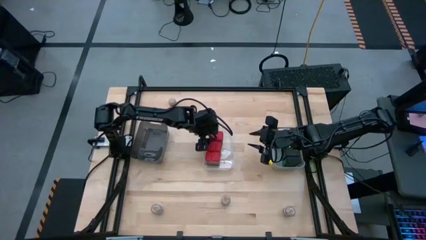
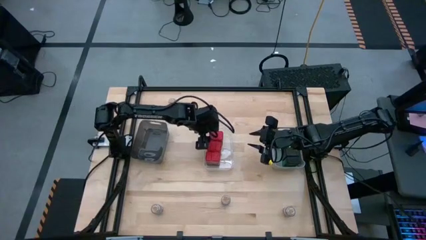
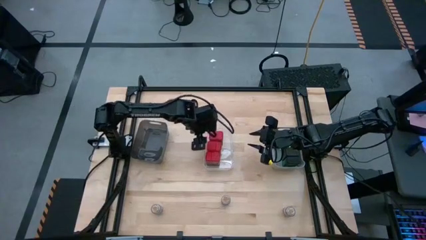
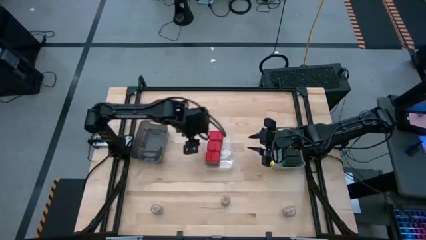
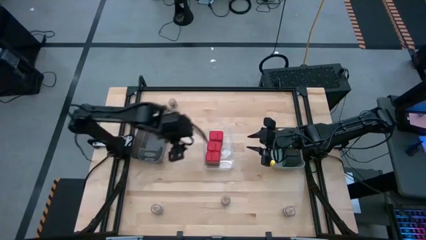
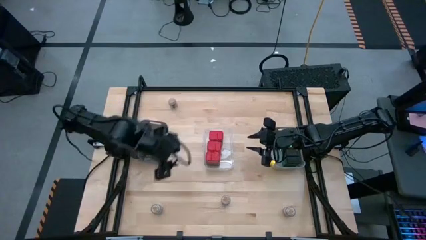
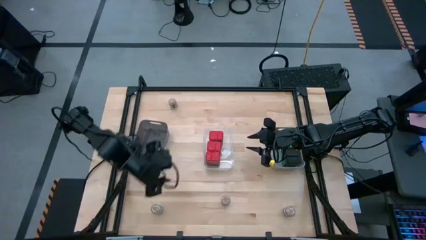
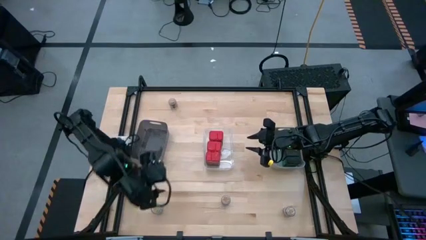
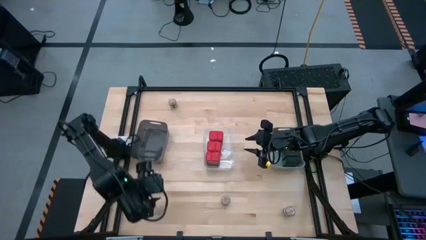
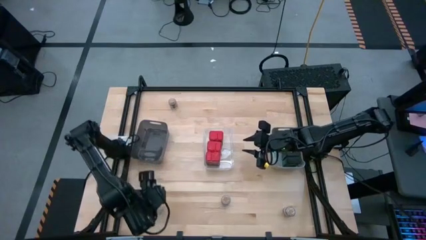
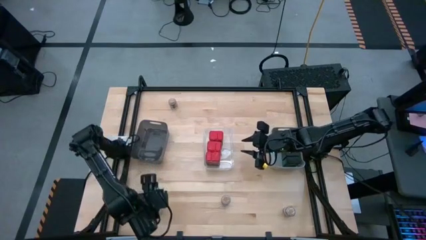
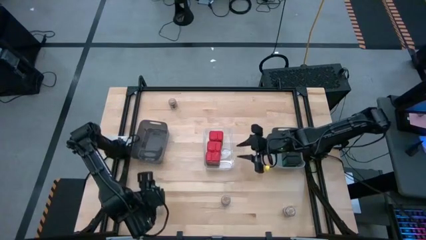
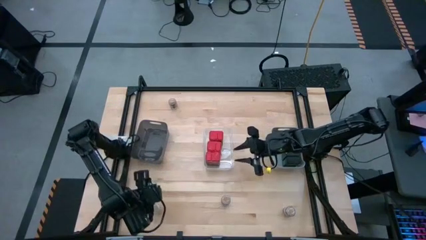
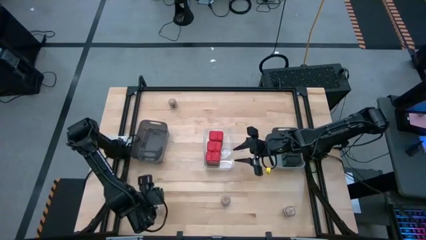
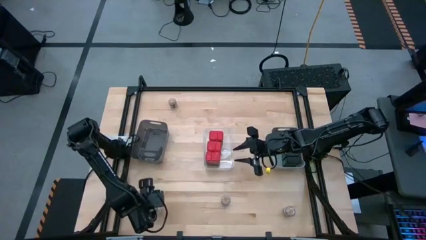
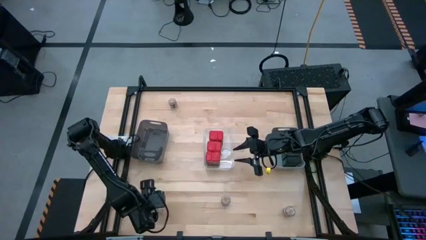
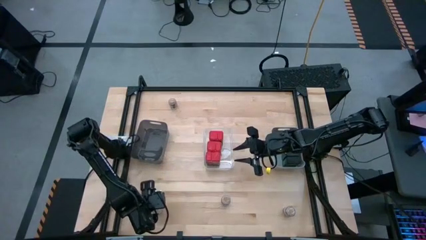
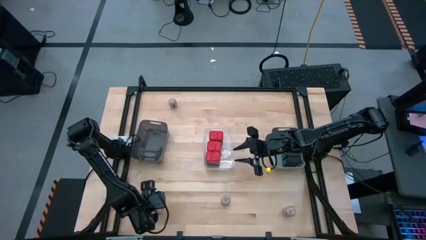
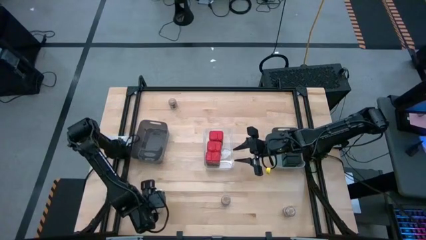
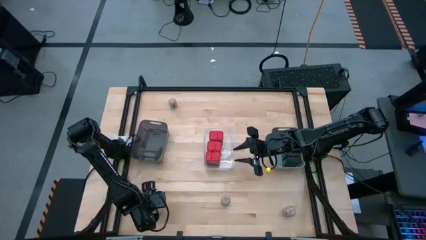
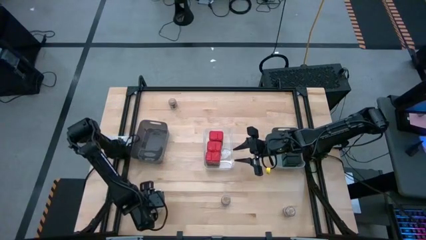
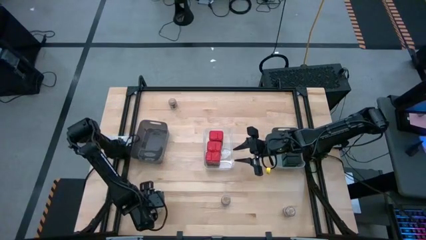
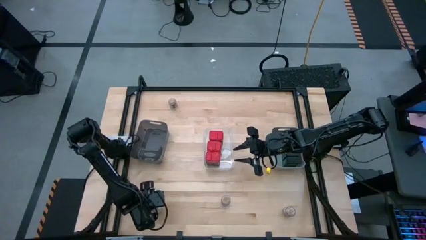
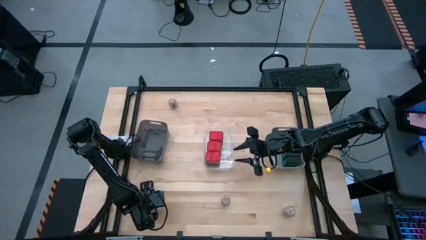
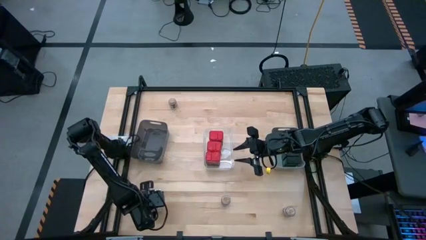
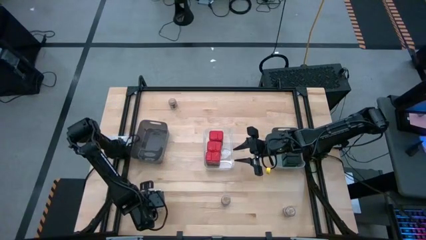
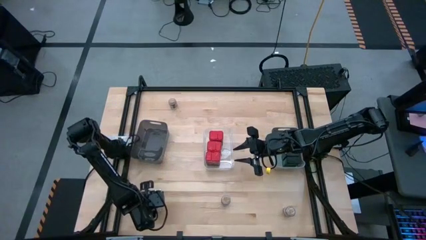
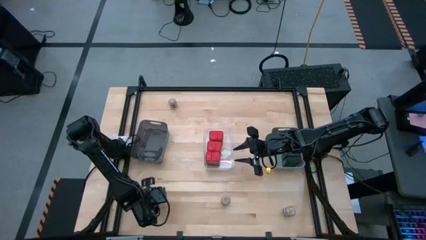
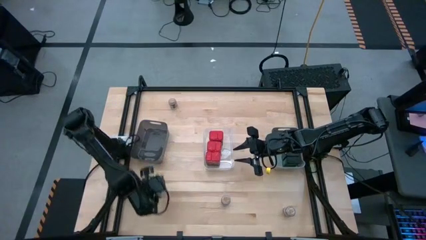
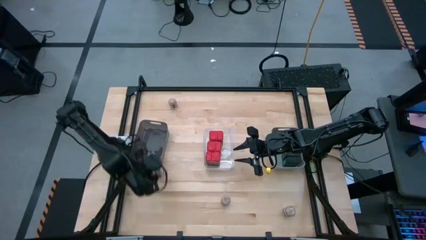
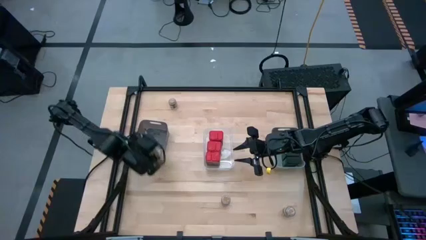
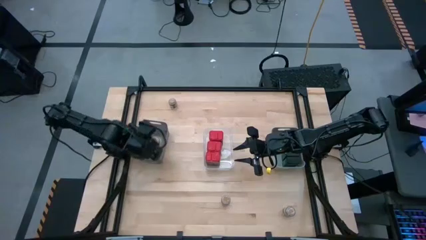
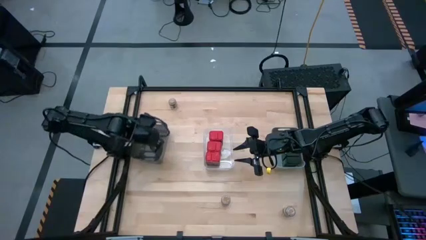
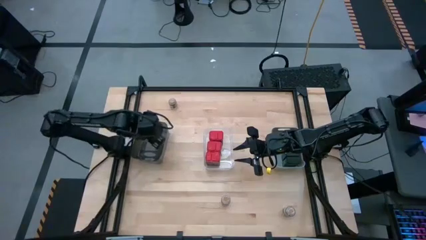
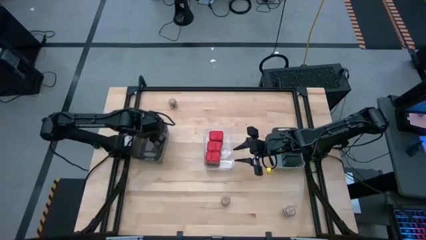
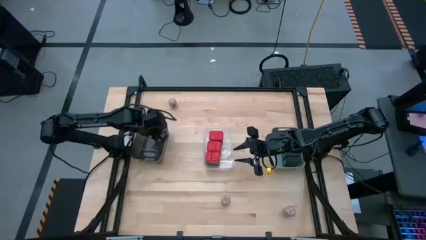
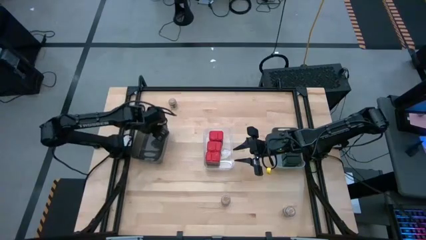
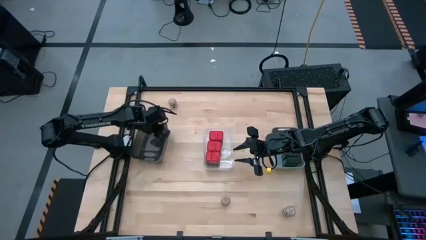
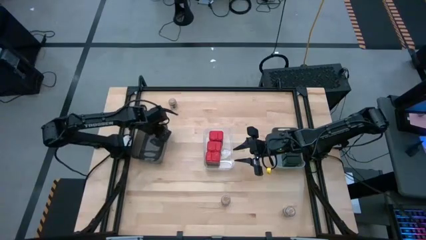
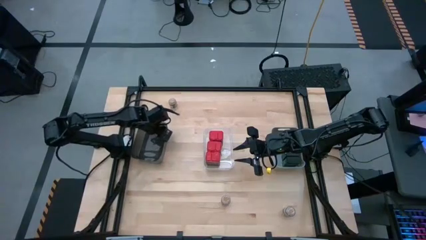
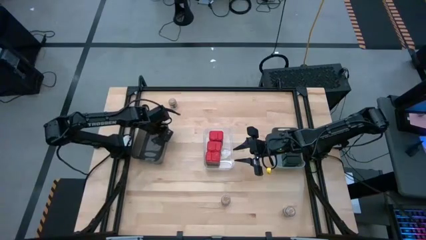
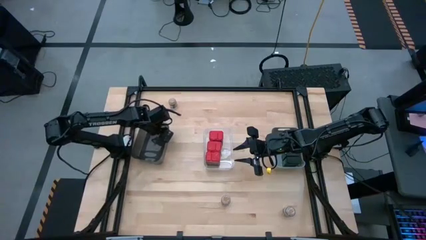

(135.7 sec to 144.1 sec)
Task: Sort spices by type
Put the brown seasoning bottle into the black bin

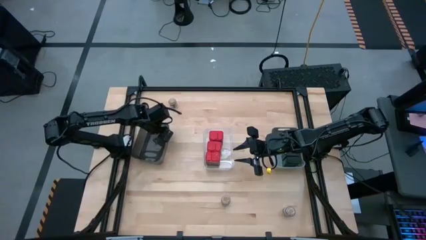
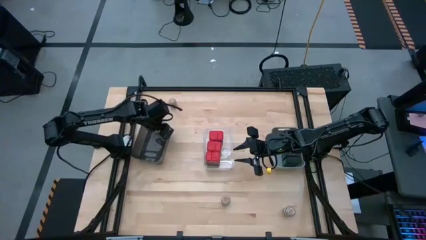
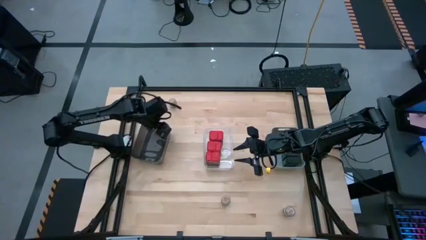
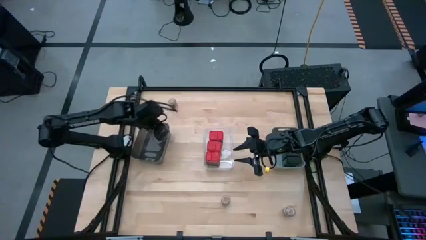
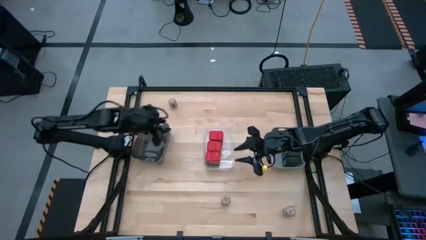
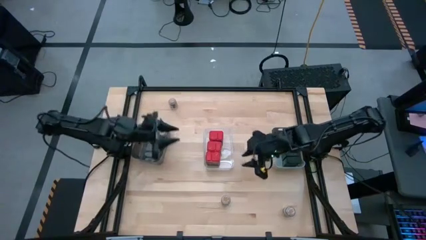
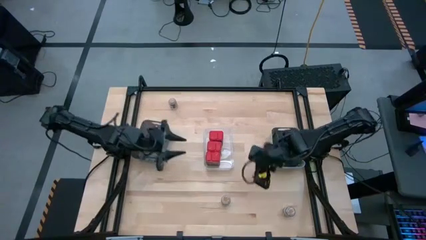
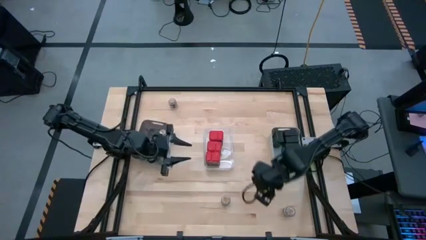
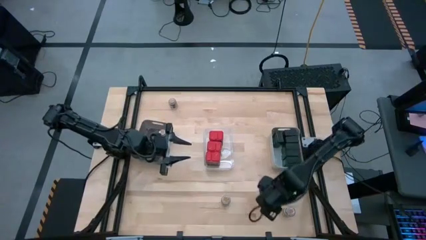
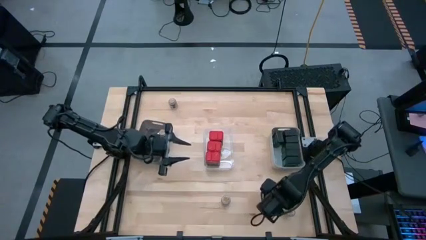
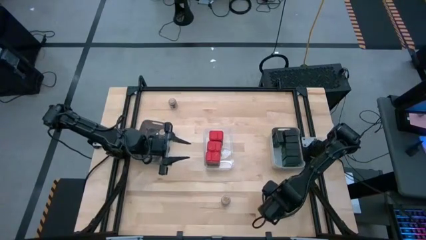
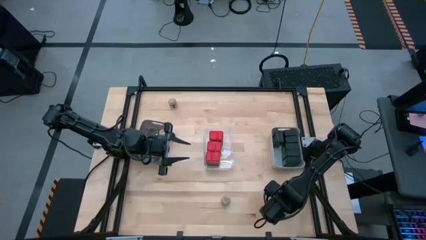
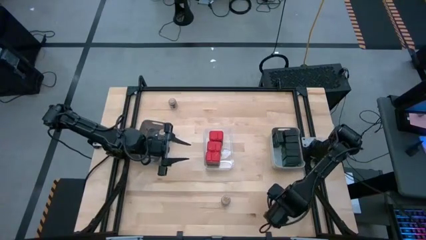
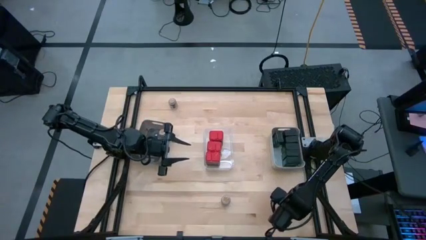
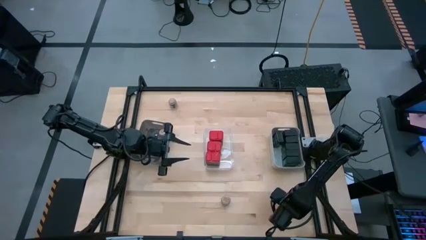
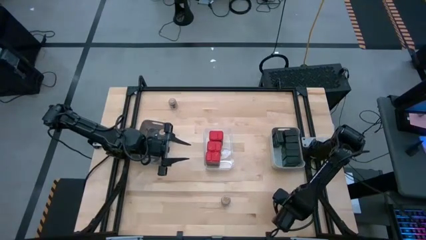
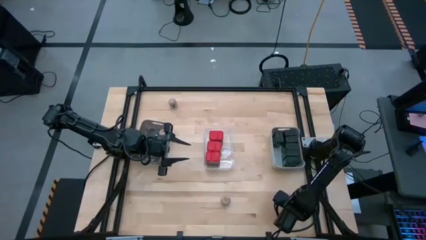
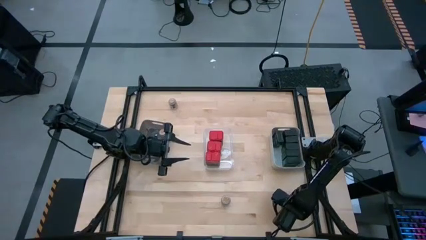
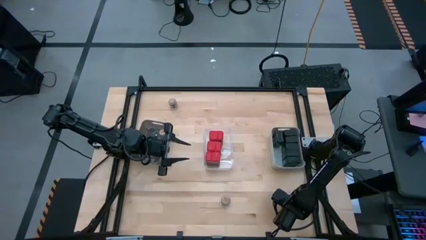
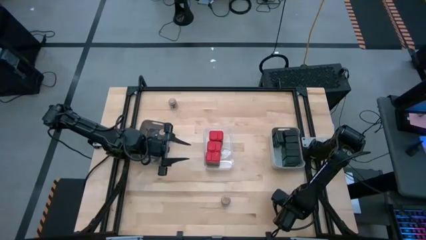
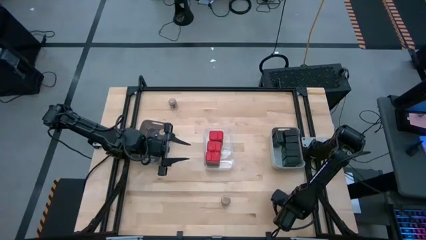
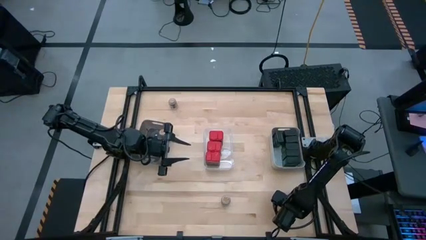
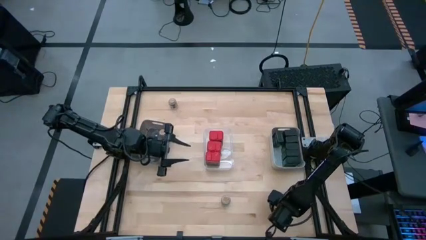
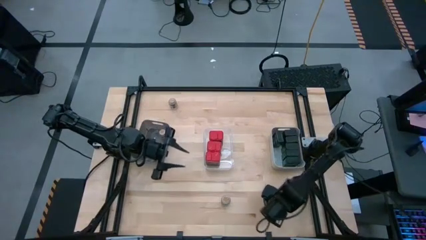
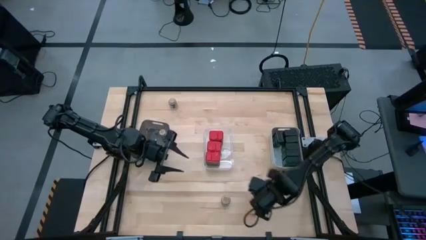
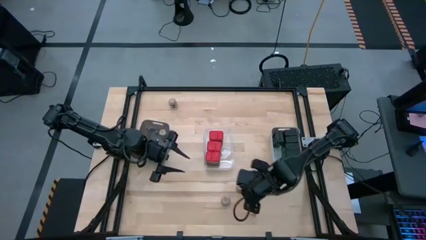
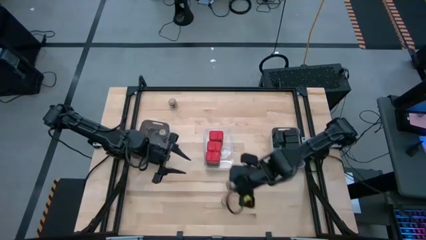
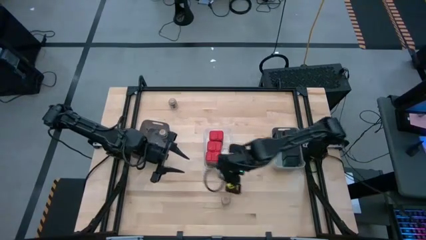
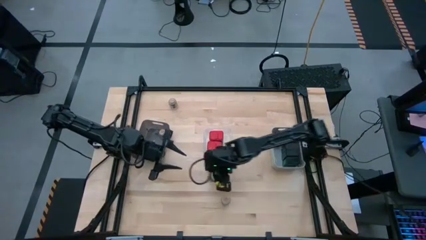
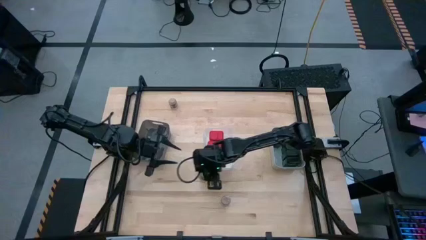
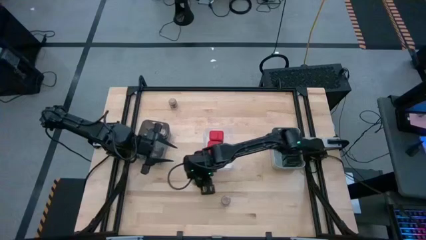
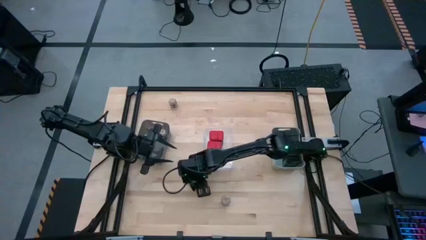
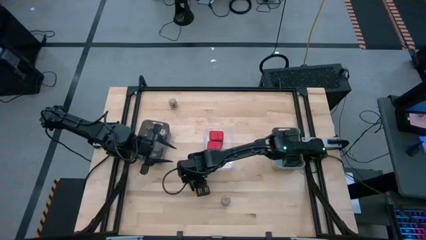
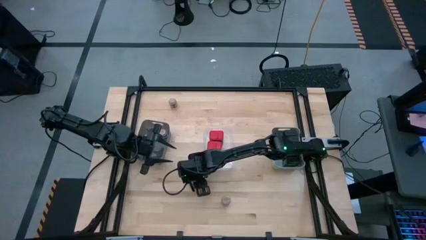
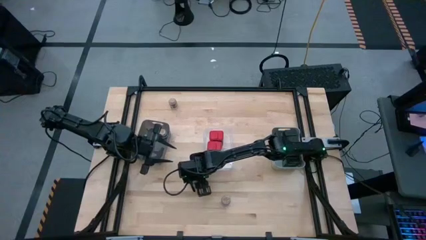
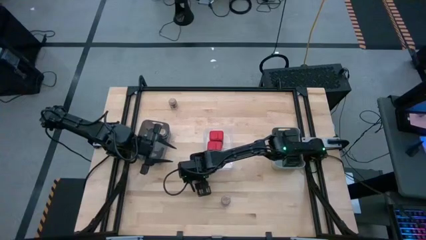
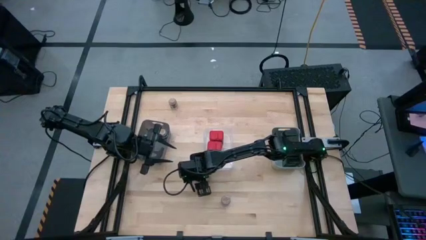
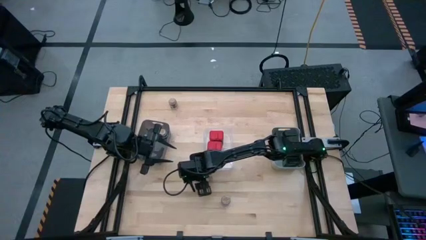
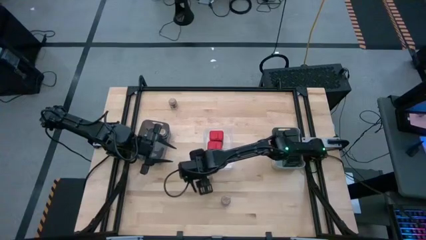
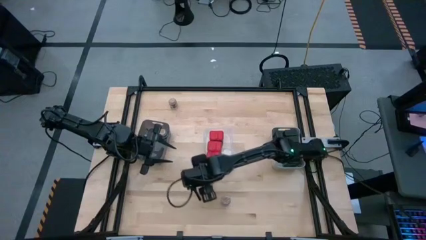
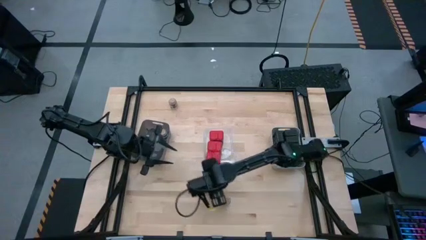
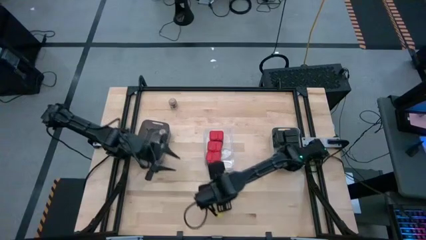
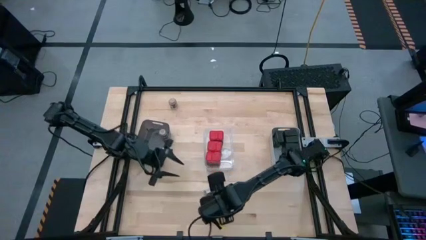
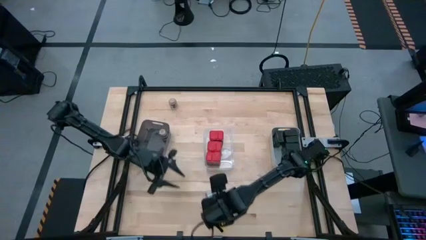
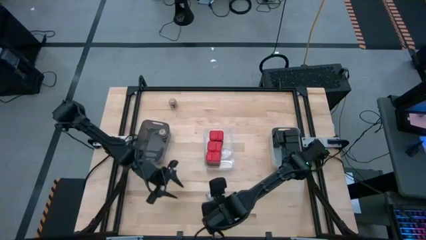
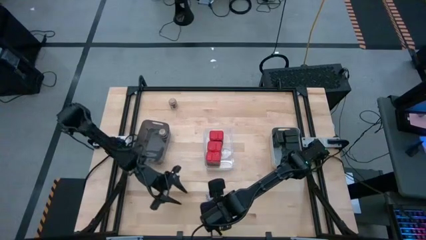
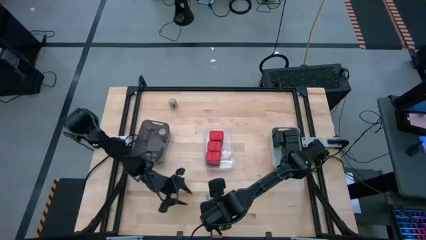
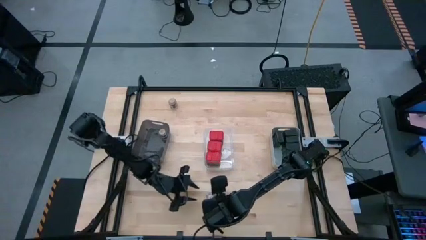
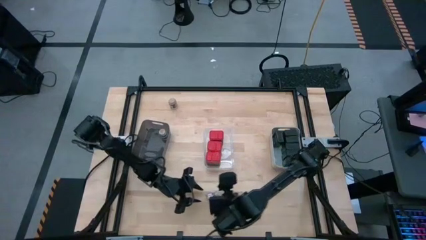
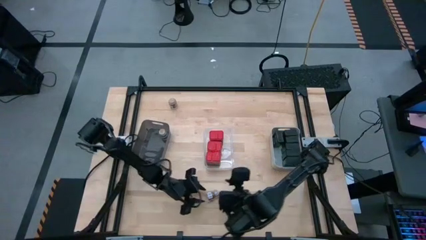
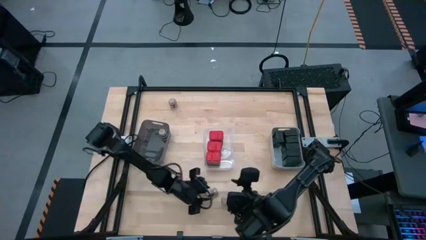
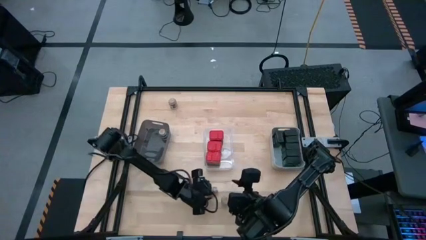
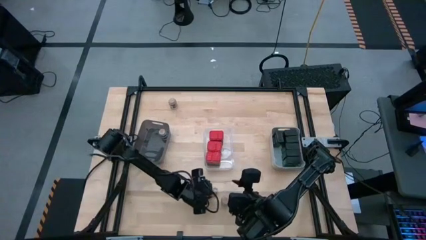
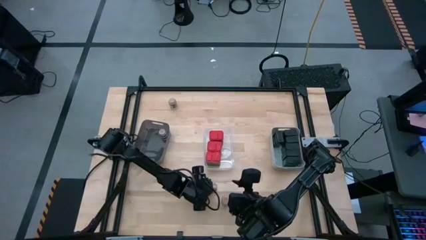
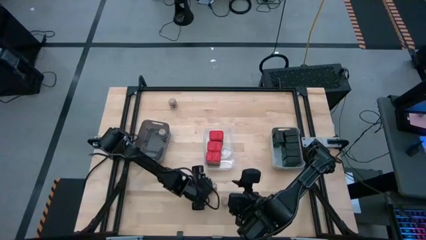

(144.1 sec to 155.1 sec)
Put the brown seasoning can into the black bin
